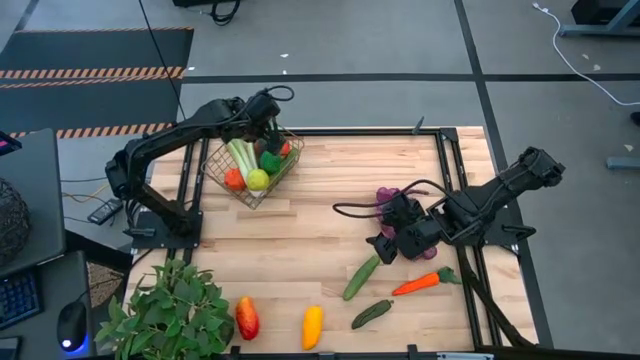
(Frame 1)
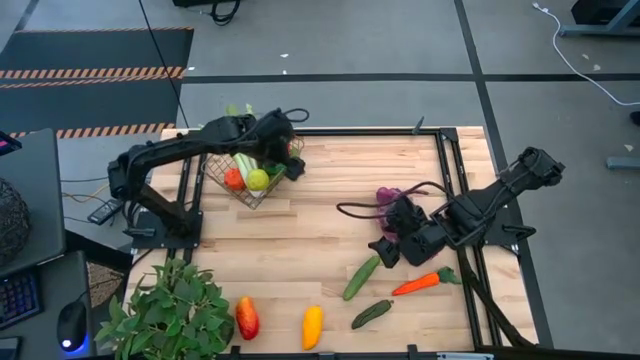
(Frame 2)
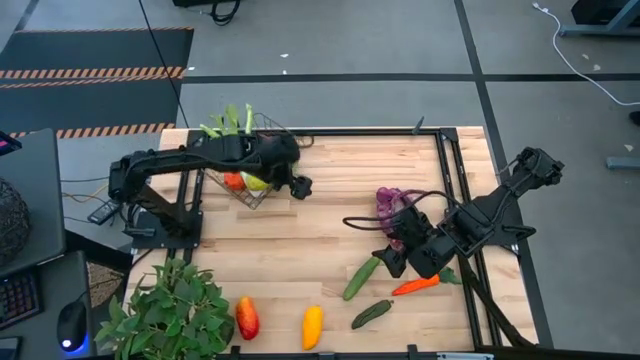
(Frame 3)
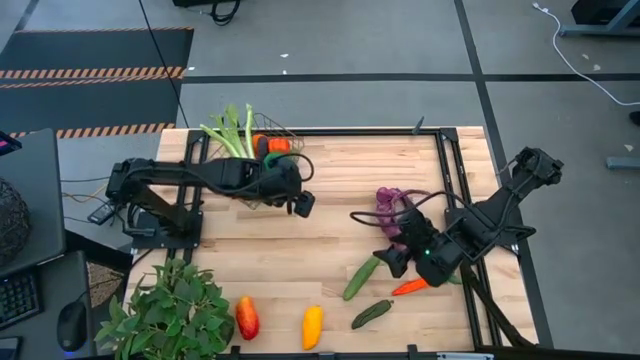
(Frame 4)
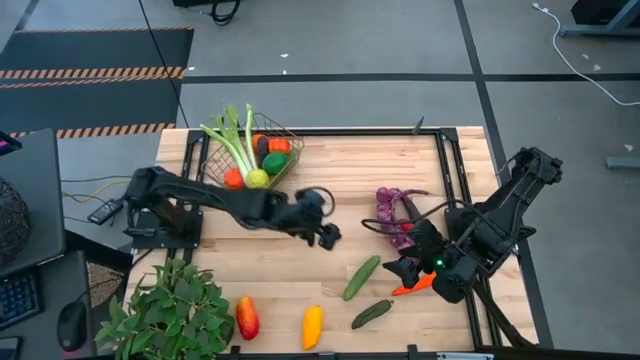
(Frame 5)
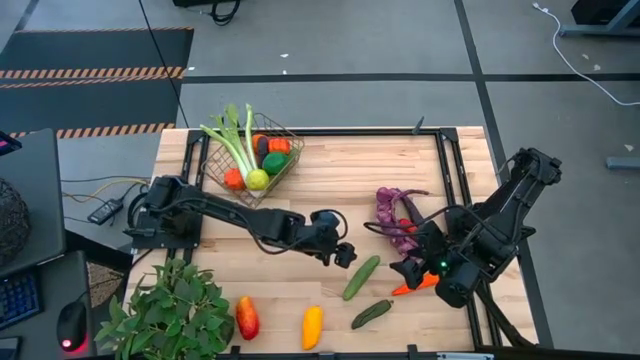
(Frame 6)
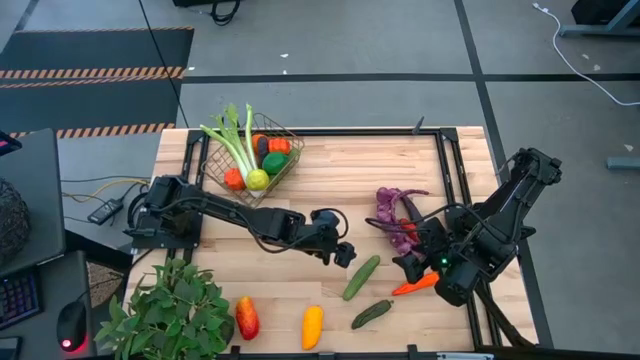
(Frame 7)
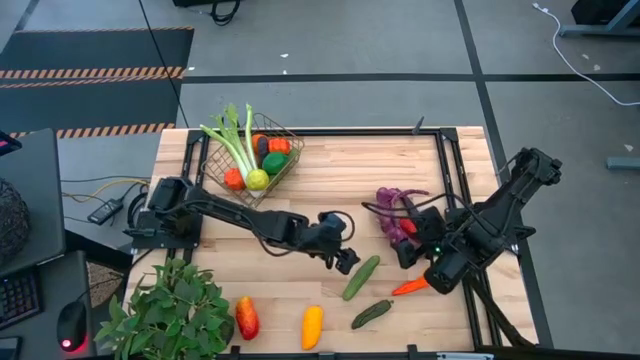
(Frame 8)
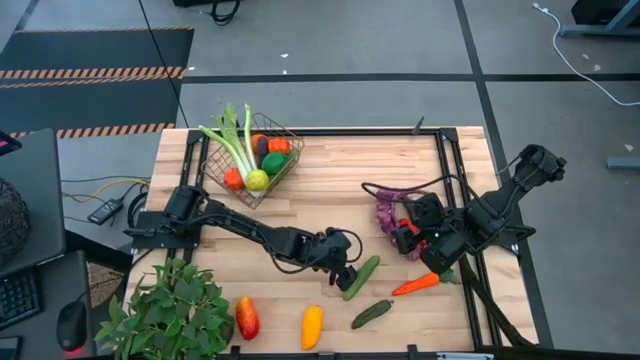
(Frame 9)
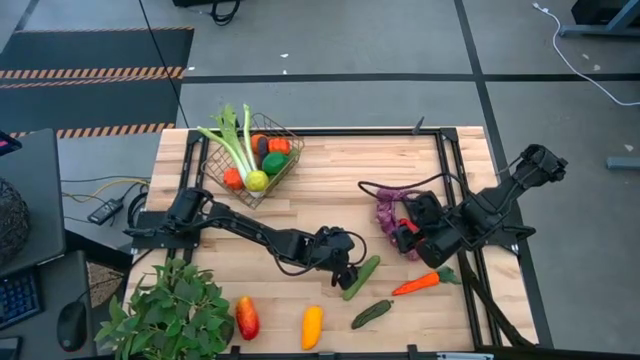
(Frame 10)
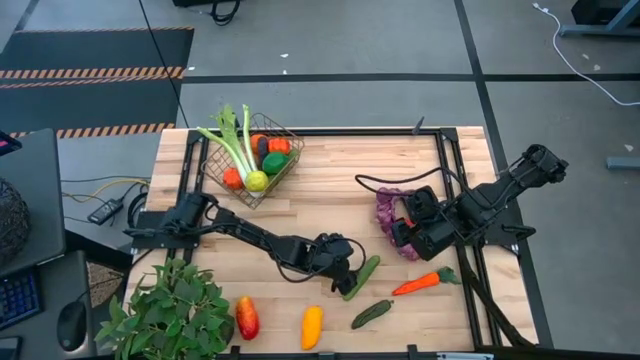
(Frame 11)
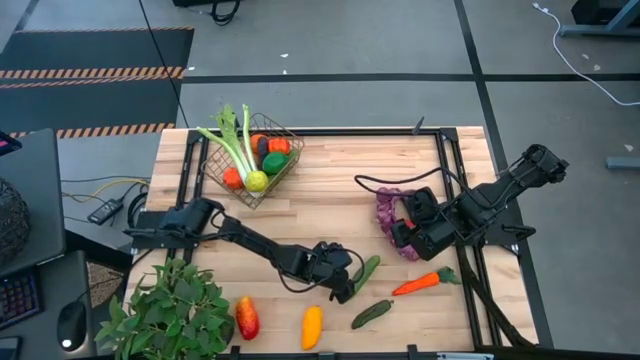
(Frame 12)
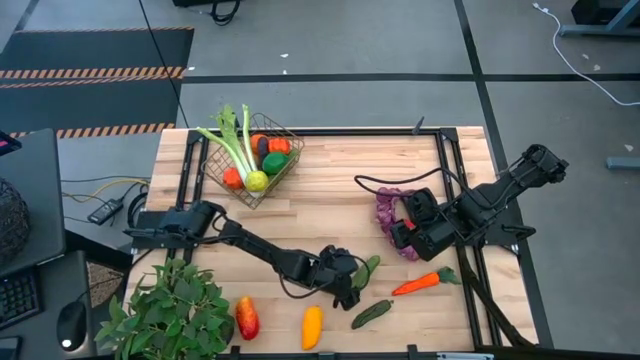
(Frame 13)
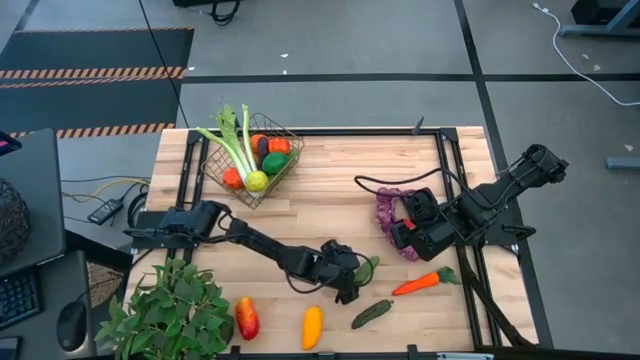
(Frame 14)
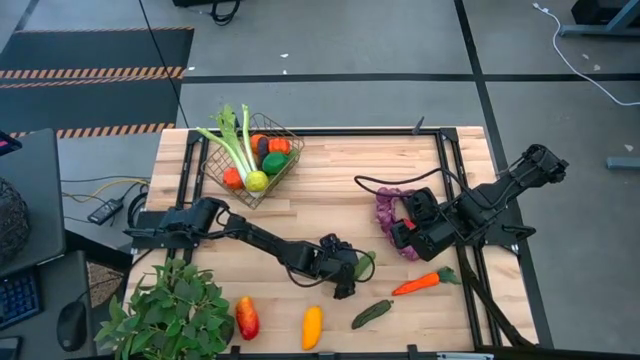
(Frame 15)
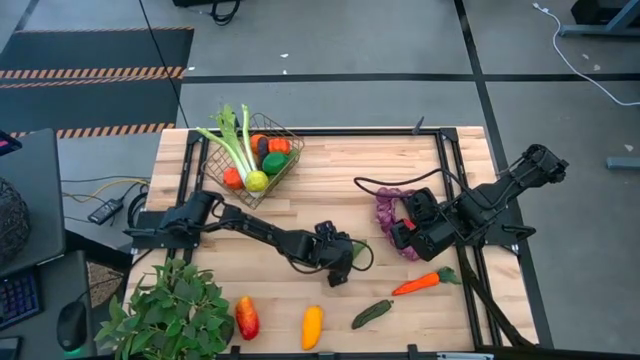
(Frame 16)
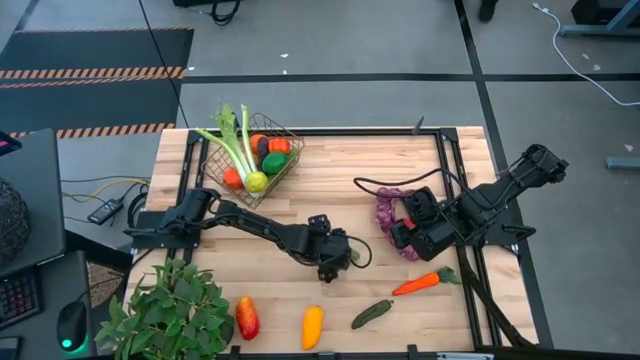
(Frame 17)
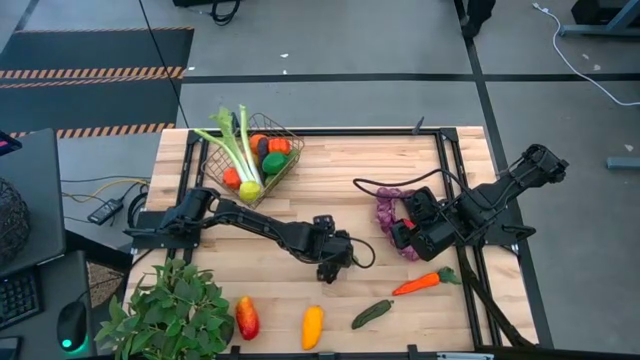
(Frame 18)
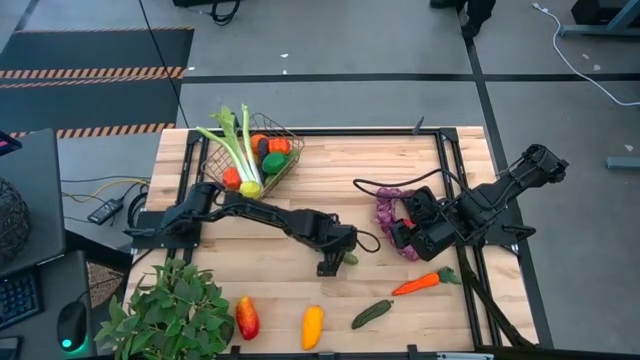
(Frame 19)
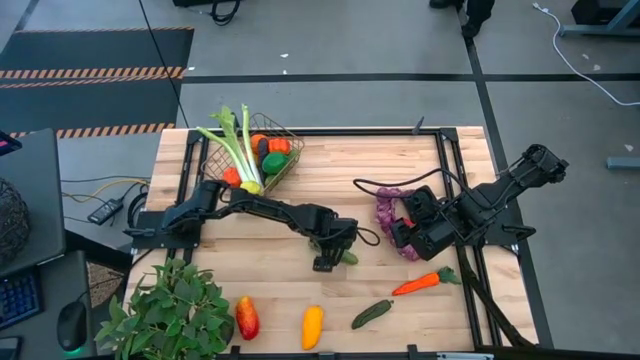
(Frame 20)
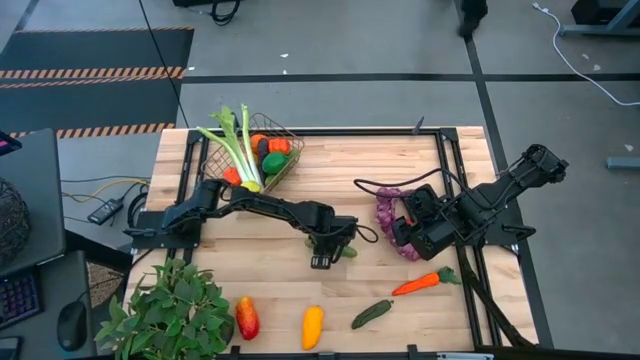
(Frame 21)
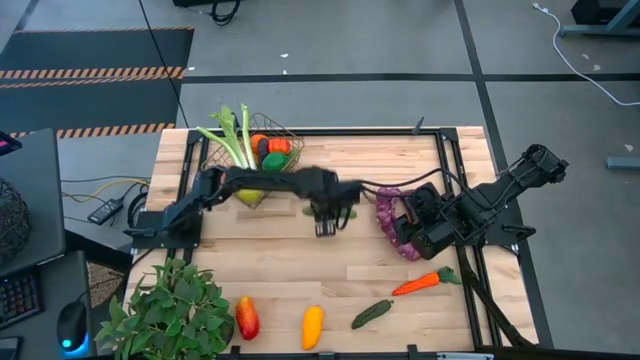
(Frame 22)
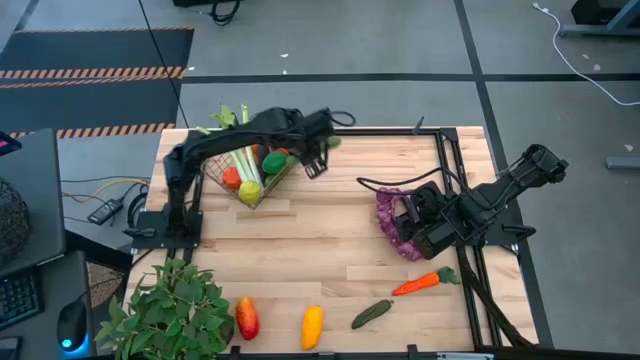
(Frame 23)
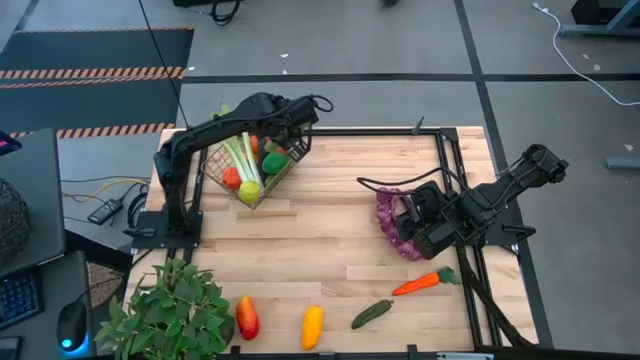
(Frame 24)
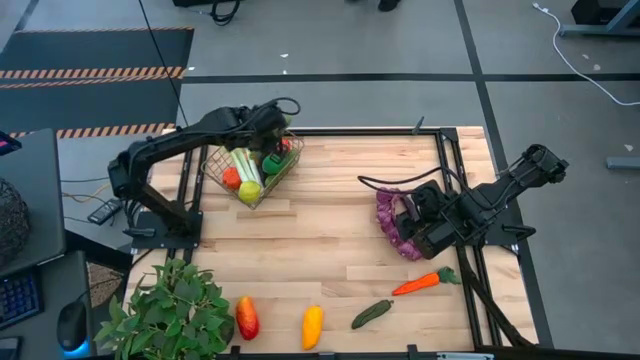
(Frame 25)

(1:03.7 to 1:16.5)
Task: Build produce basket
Put the cucumber into the wire basket

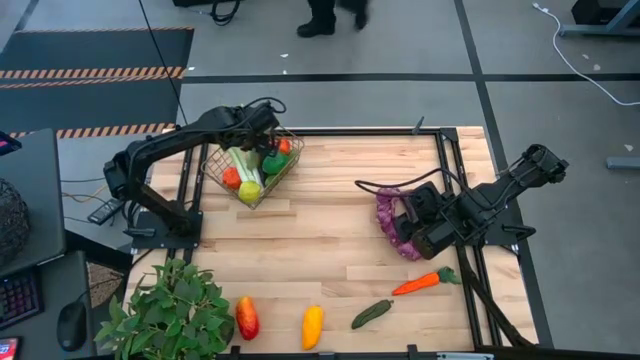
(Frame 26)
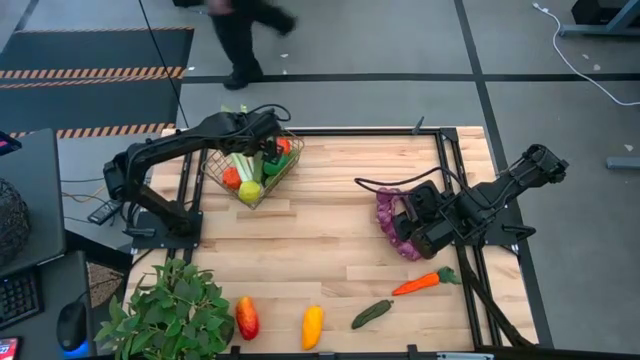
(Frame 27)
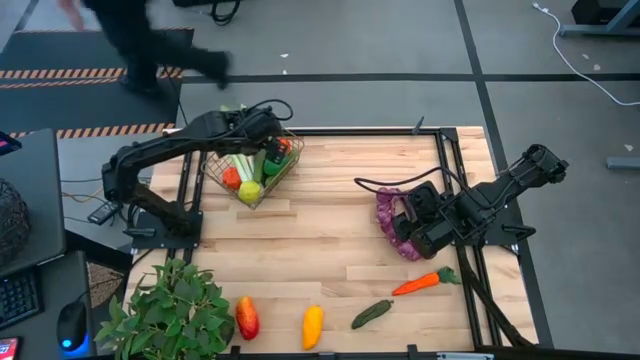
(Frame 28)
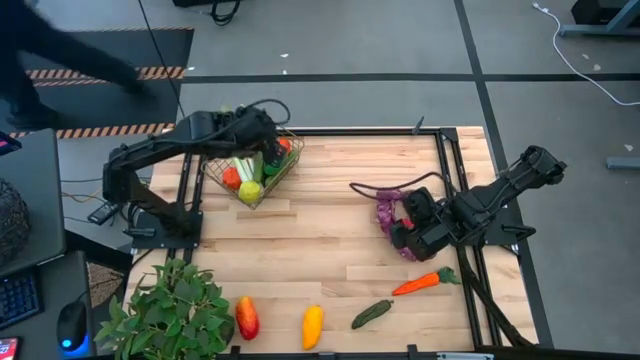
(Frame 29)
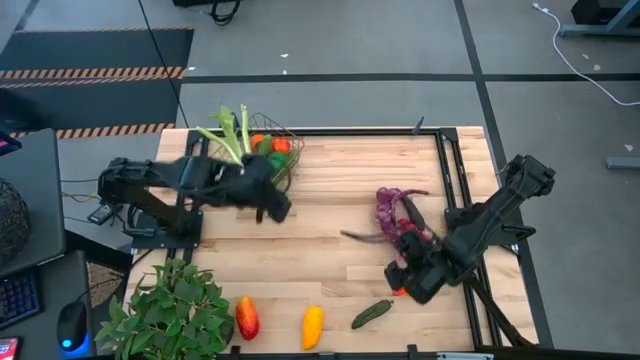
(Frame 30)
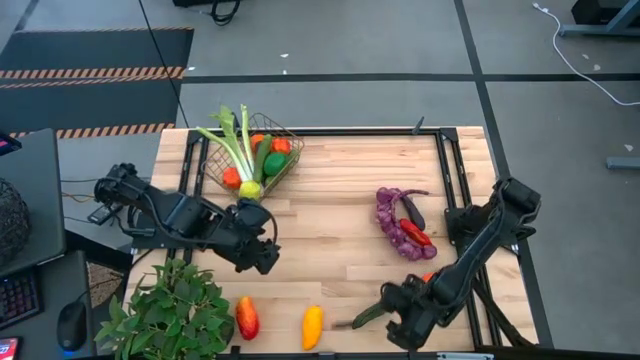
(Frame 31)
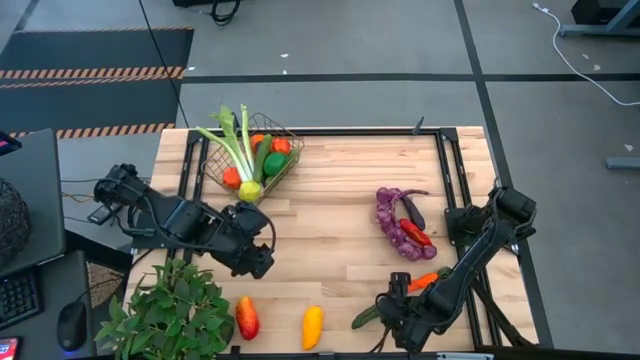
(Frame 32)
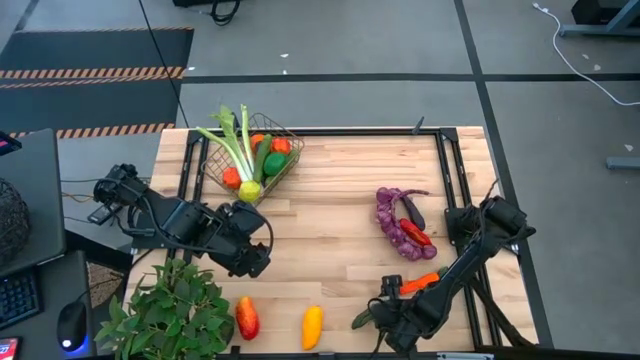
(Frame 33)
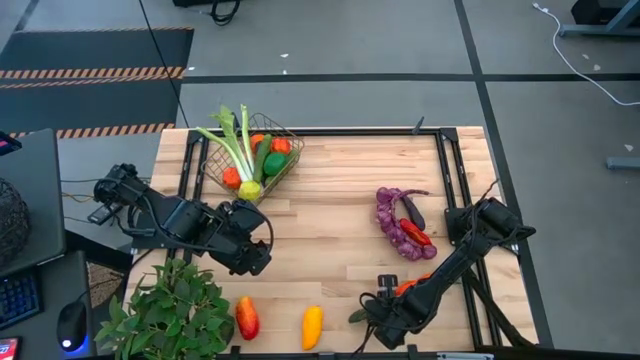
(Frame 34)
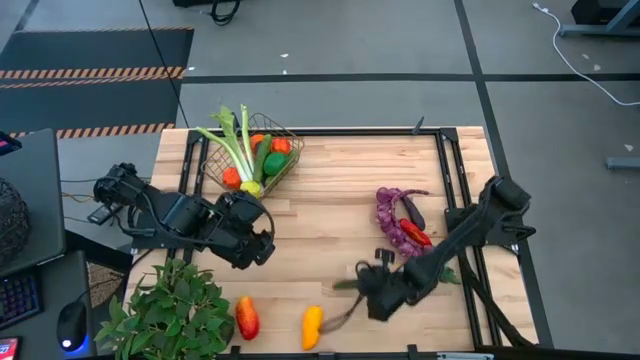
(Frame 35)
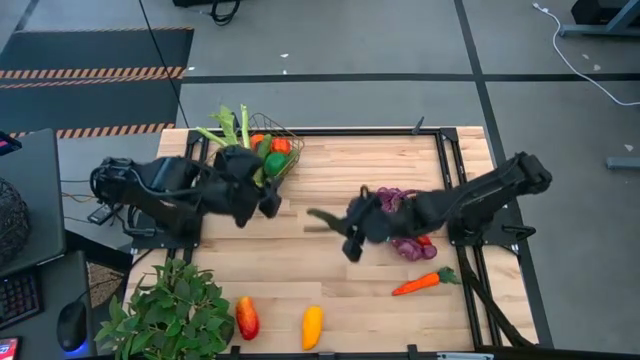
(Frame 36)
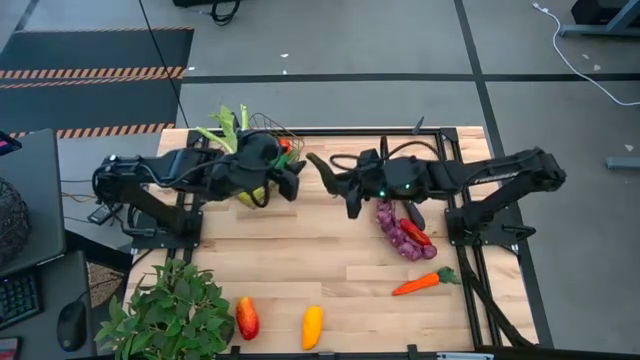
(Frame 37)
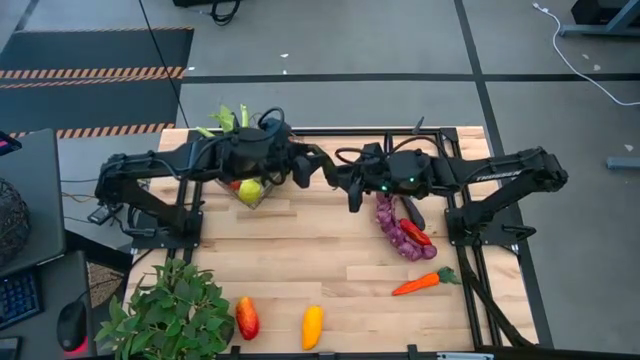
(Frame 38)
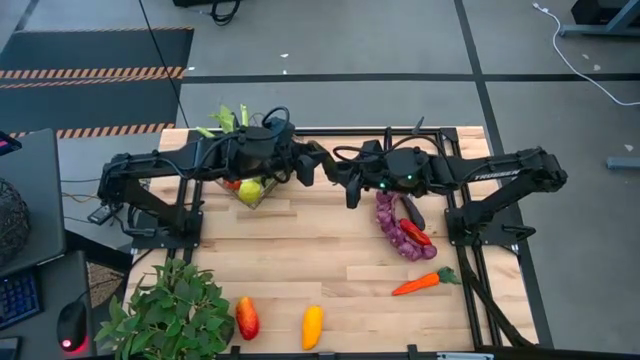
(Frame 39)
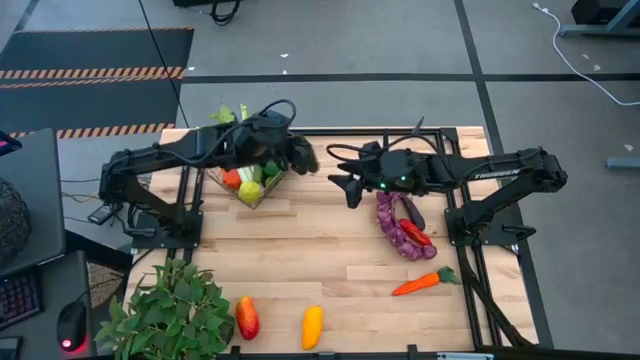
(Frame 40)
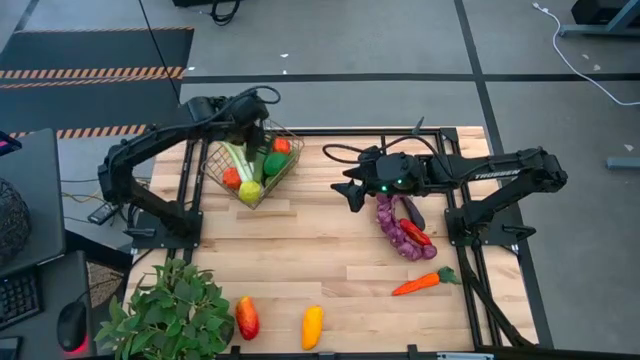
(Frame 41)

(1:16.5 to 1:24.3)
Put the green chili pepper into the wire basket
